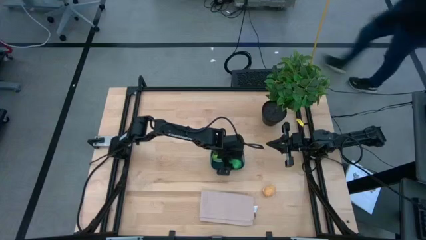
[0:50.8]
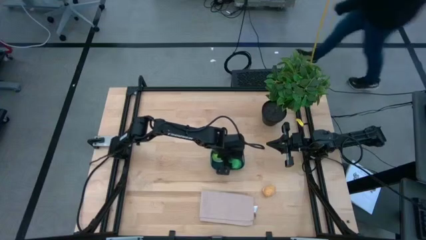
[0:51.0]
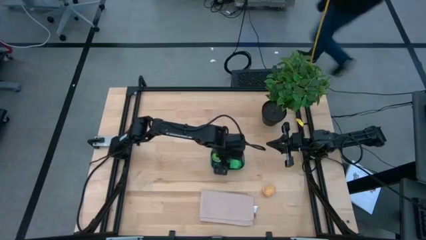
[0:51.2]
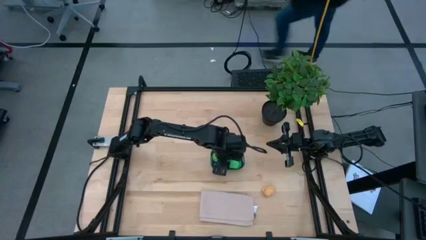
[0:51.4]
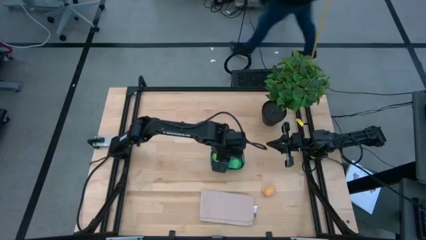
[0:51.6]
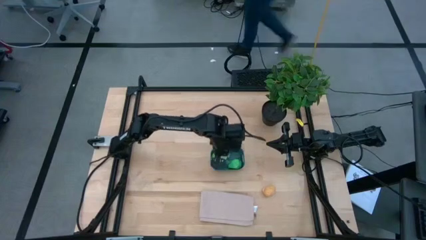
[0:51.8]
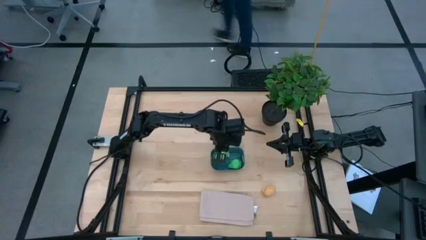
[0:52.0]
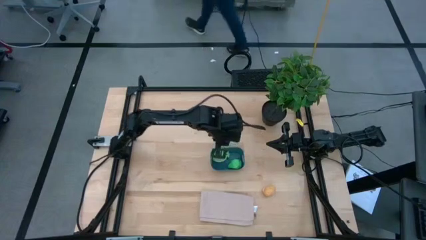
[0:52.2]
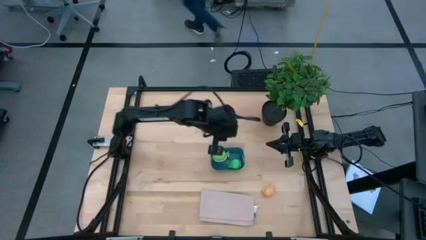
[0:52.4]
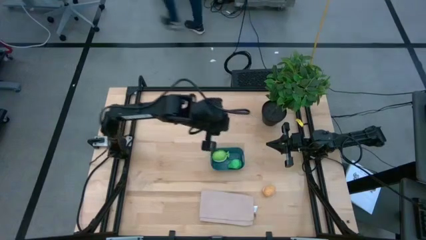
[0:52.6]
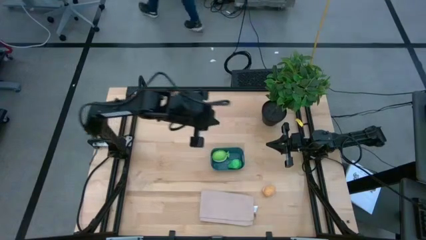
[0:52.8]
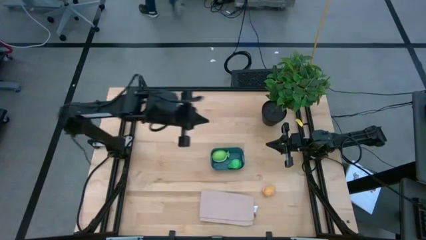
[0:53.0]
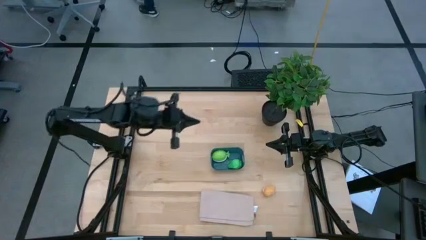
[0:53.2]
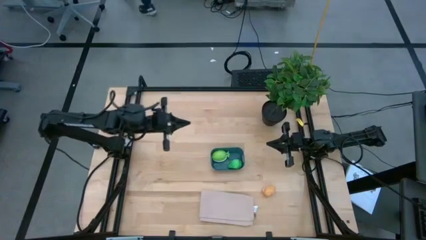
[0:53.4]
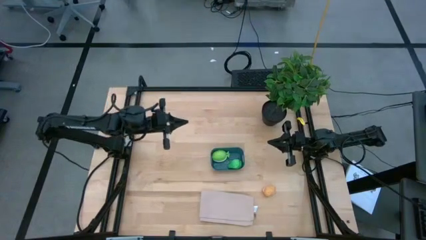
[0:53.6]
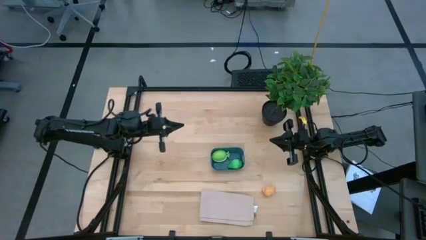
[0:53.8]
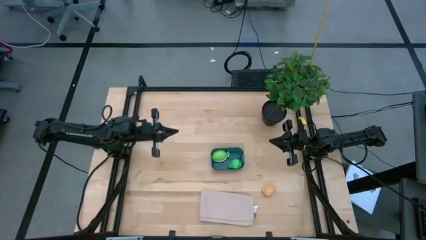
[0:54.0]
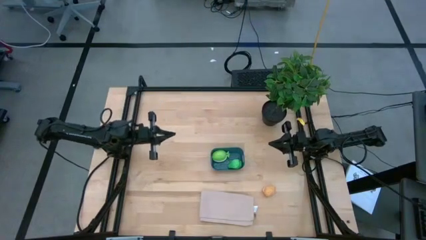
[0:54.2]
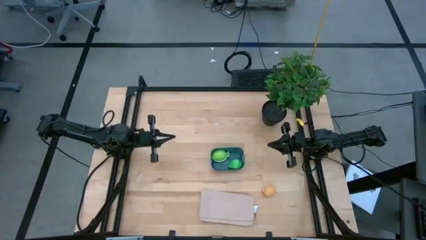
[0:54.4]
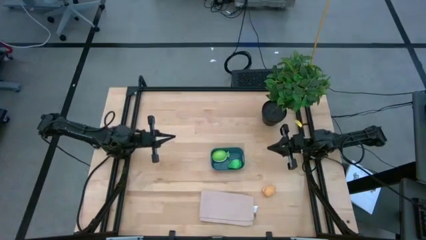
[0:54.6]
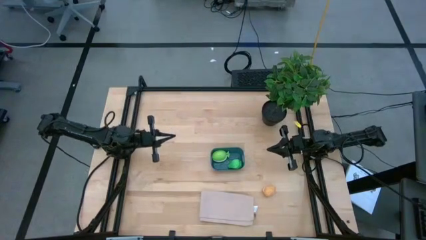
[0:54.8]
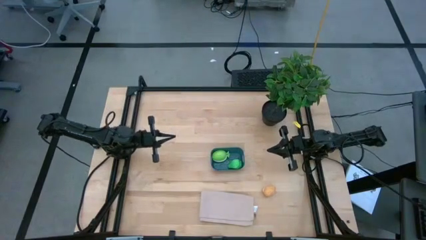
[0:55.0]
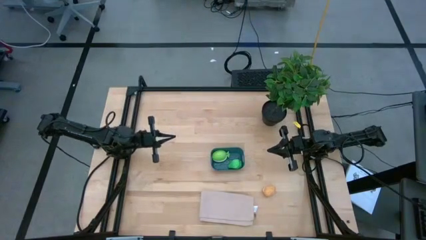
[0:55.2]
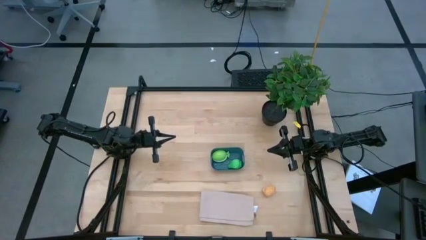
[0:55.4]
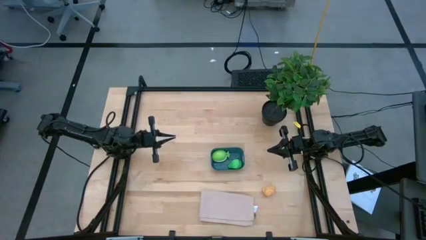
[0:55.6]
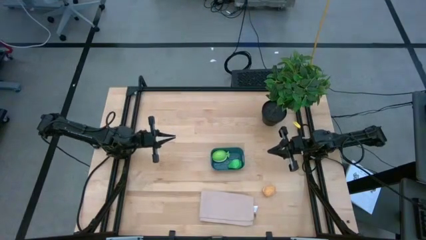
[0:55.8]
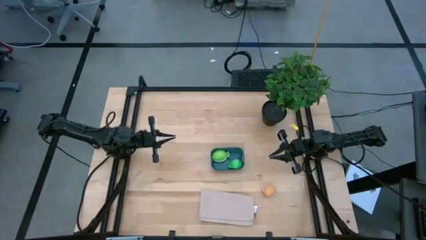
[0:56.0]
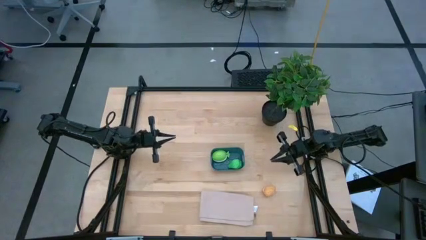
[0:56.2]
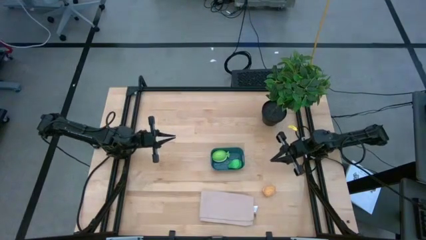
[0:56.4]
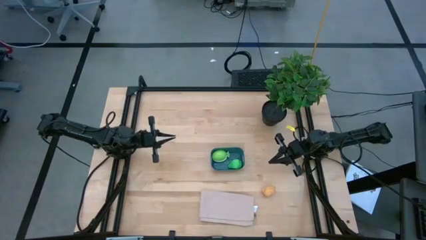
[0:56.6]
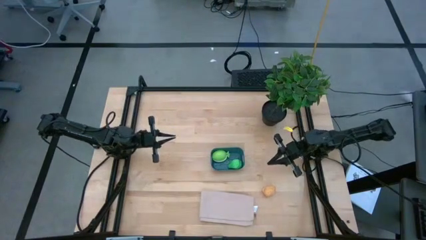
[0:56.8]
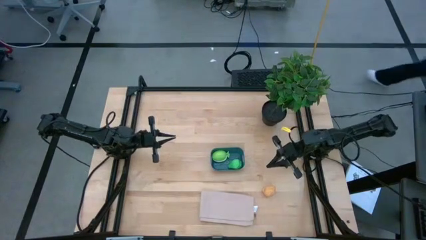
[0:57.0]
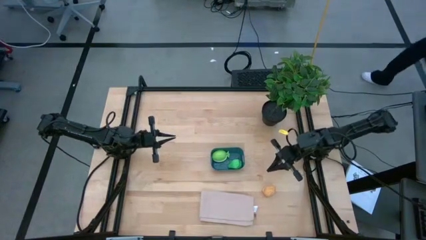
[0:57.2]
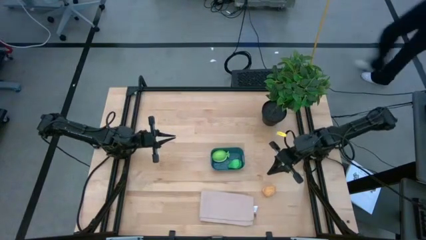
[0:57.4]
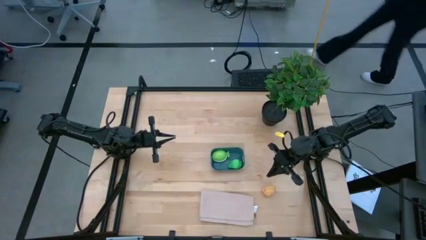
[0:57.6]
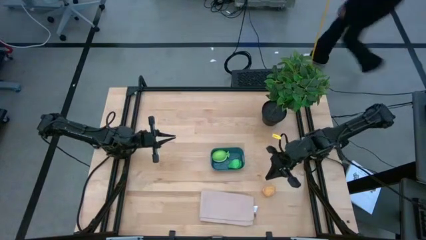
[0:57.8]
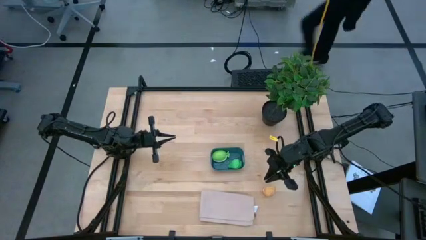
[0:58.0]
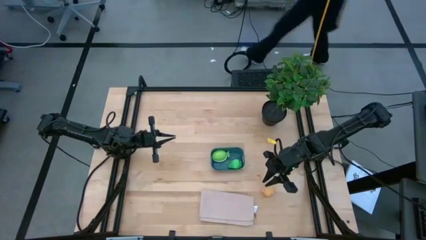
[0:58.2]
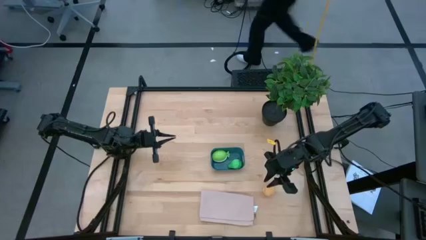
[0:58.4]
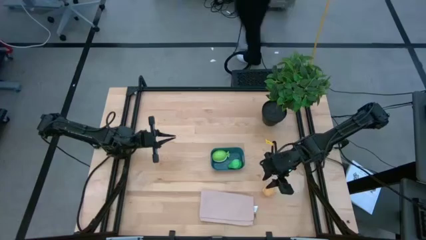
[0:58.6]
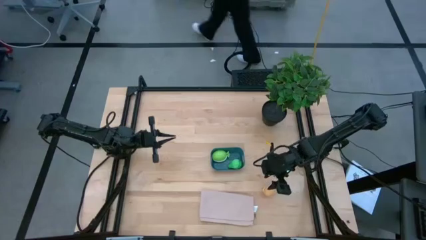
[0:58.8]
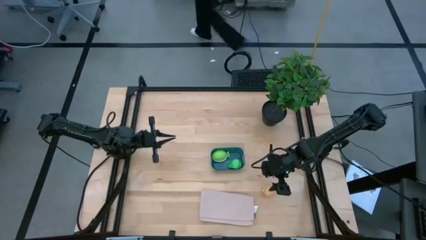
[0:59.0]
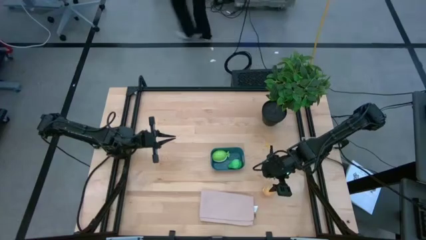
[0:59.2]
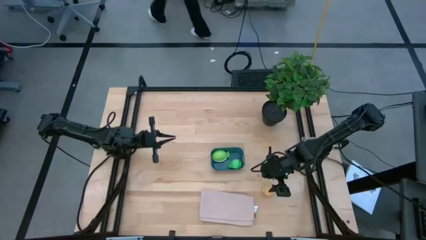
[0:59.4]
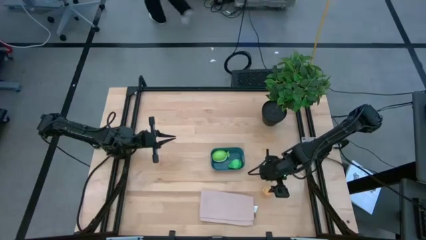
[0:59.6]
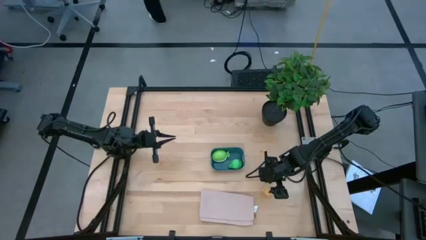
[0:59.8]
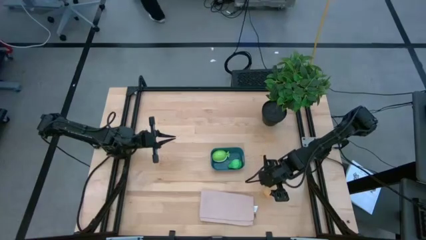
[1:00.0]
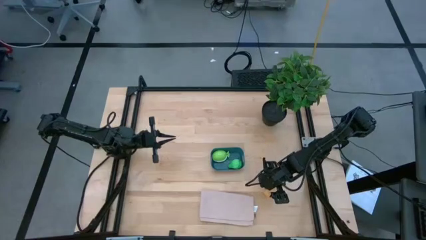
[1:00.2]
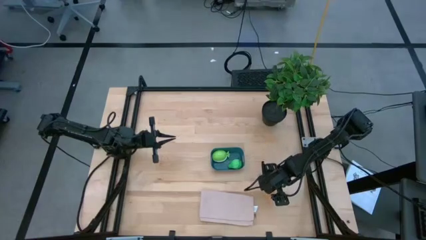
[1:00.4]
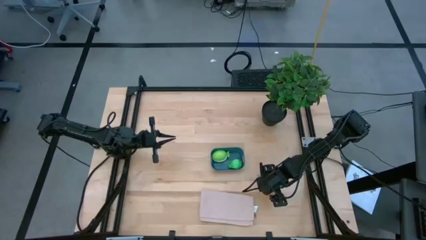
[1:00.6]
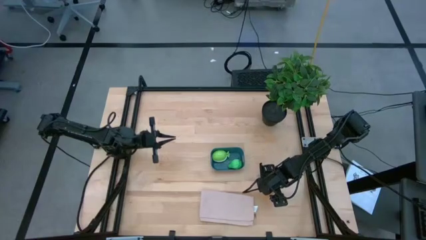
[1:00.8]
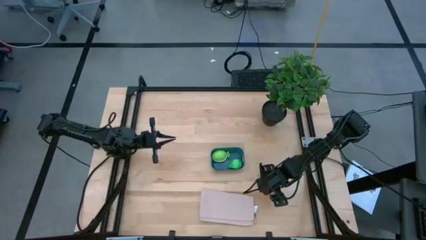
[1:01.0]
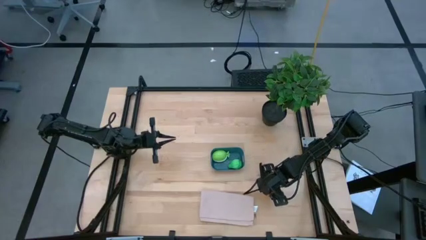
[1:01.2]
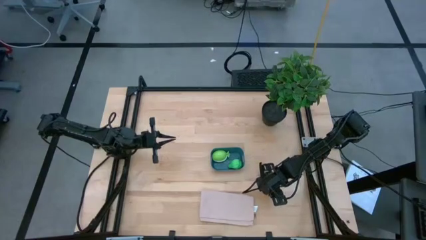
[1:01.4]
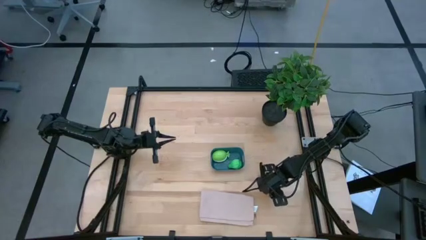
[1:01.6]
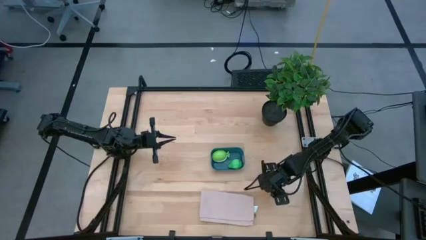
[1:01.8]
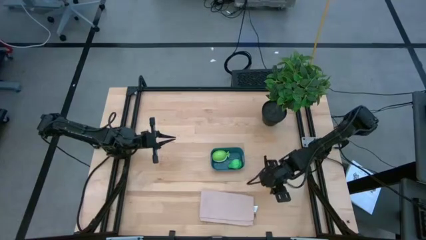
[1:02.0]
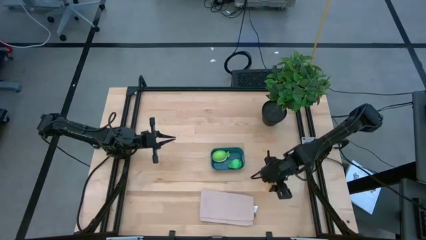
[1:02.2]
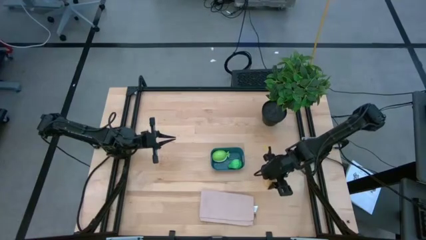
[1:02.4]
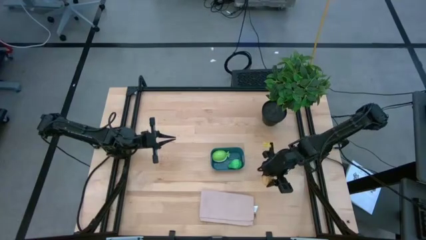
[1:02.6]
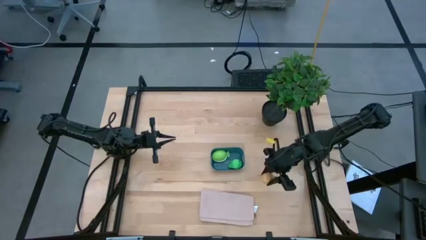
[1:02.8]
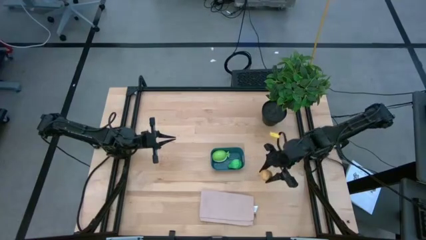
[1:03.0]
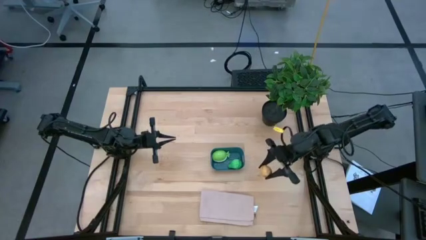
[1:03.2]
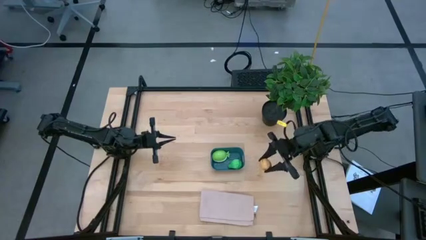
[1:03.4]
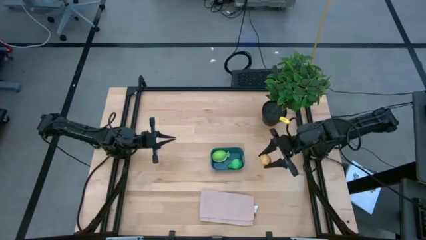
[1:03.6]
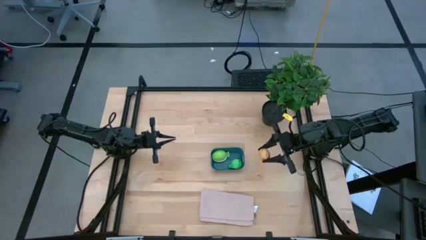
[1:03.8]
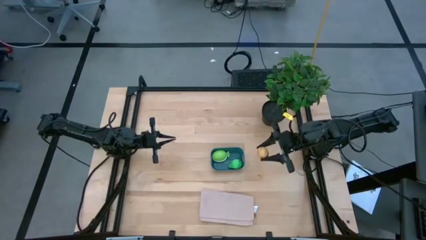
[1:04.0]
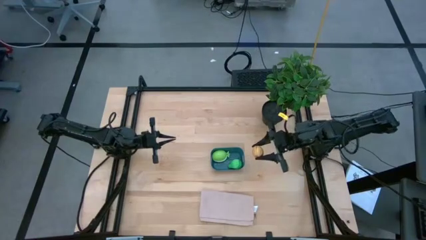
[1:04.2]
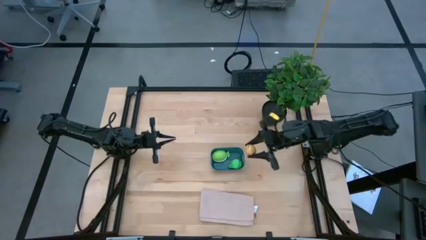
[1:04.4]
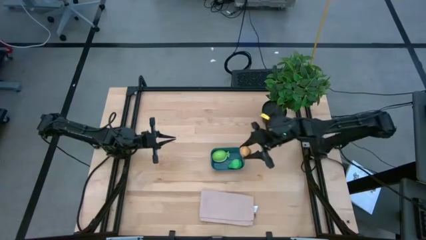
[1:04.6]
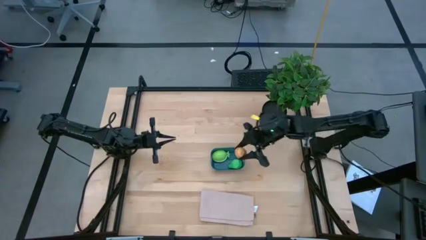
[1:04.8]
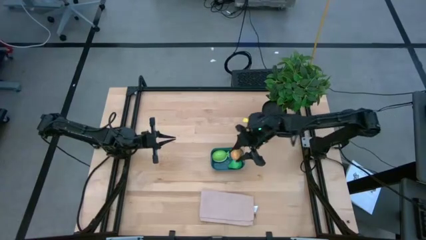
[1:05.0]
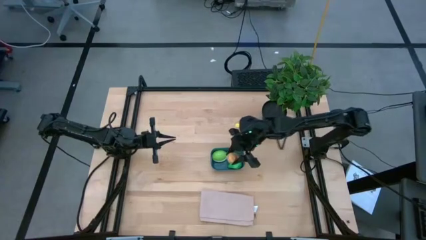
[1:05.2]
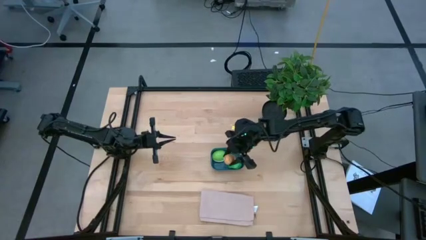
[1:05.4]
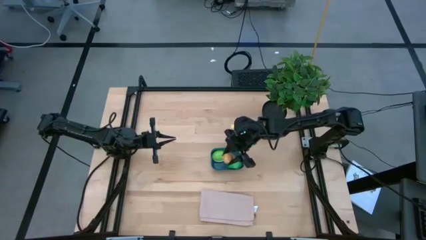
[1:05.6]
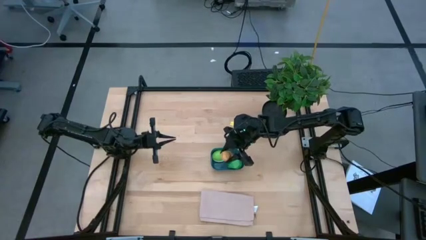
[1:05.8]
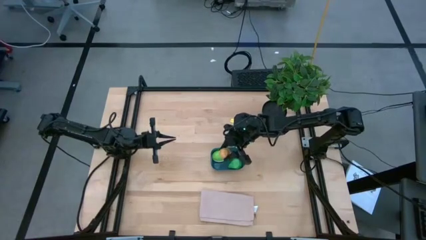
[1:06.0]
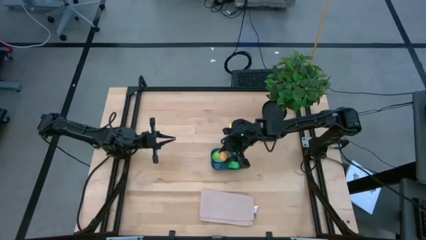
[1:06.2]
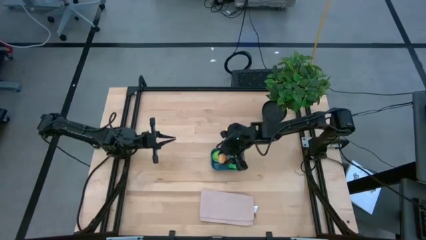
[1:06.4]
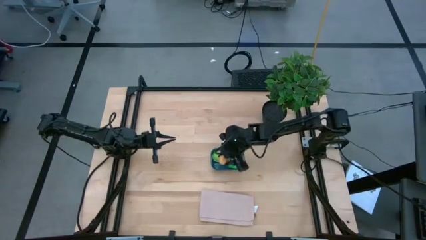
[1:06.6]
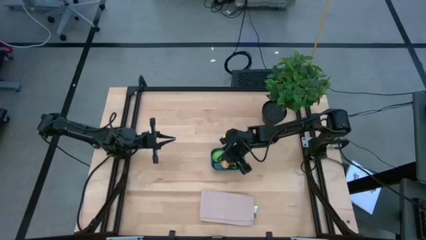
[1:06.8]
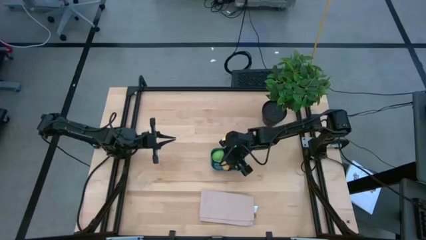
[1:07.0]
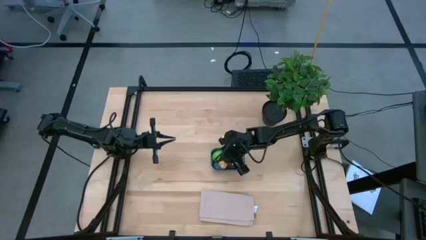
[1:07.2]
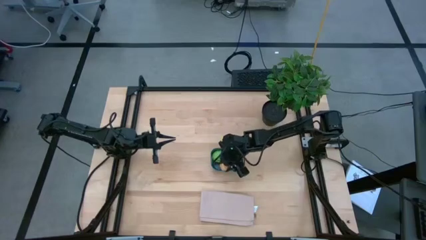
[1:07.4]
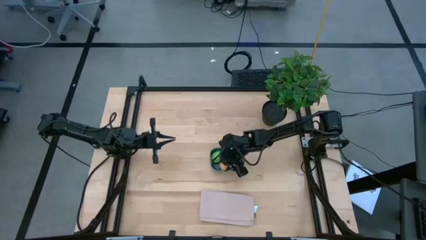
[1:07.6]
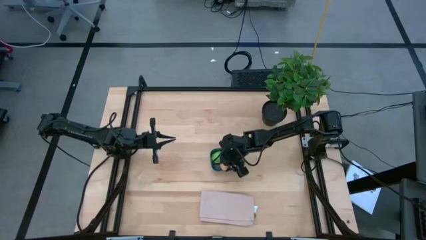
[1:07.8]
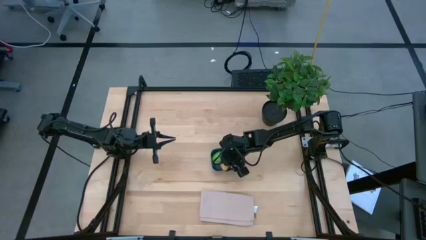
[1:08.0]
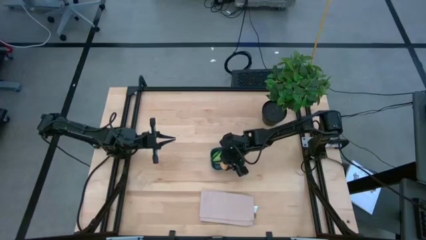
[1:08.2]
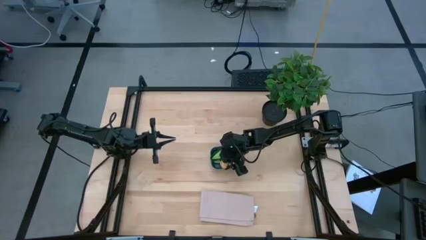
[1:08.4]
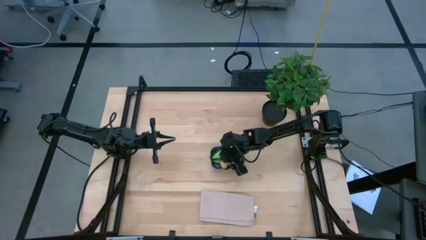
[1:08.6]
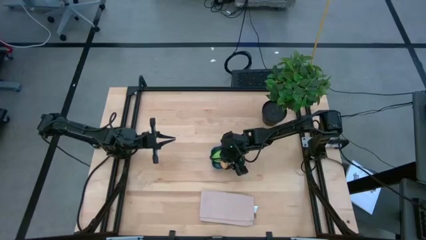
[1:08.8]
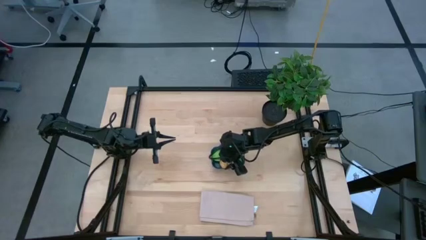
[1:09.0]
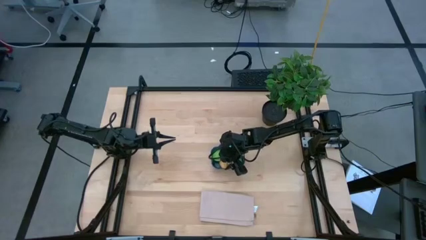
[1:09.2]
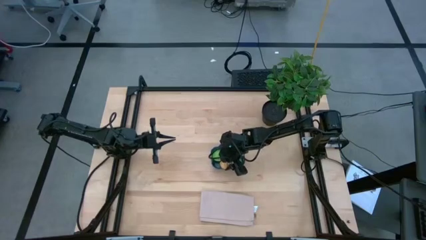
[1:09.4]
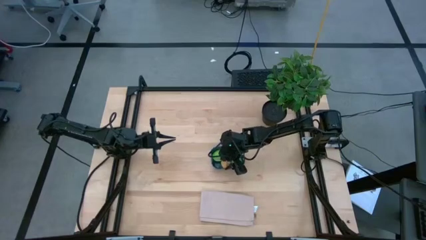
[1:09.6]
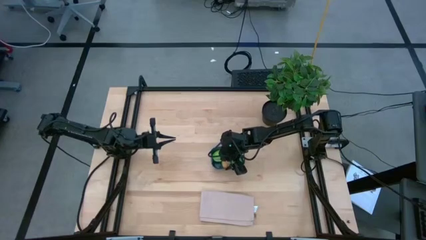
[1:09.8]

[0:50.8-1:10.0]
Task: Pick and placing Produce into tupperware
Put the brown potato into the blue bin
